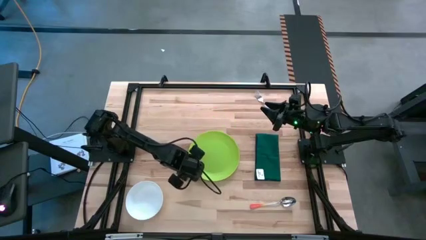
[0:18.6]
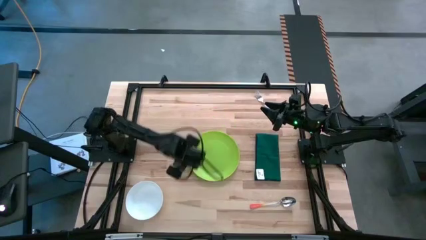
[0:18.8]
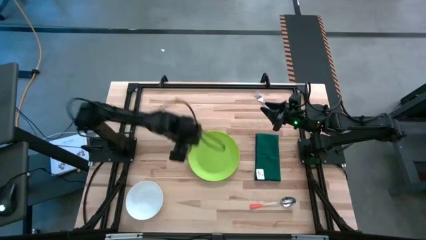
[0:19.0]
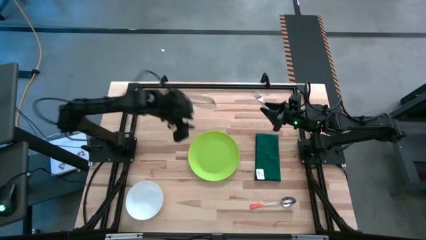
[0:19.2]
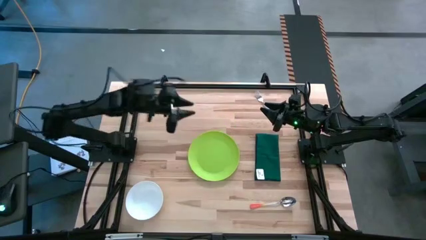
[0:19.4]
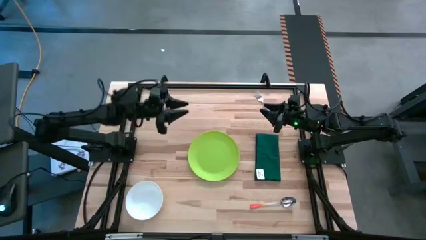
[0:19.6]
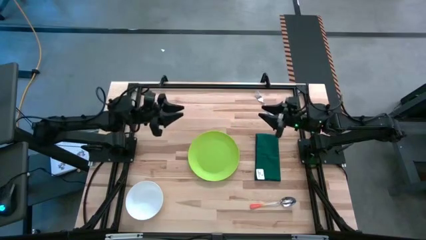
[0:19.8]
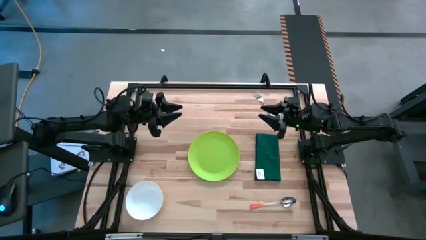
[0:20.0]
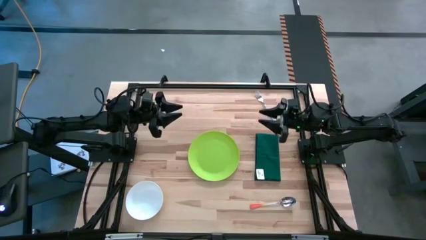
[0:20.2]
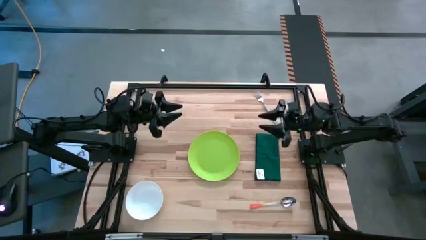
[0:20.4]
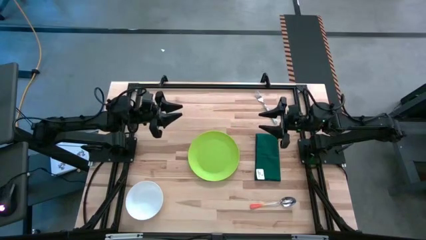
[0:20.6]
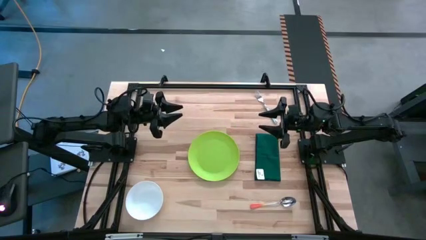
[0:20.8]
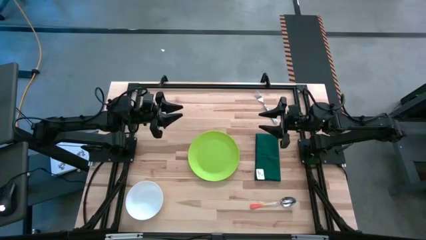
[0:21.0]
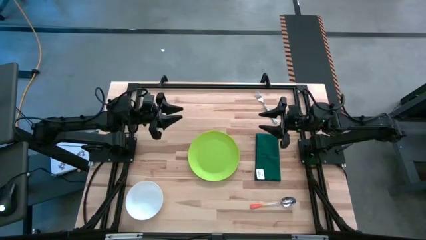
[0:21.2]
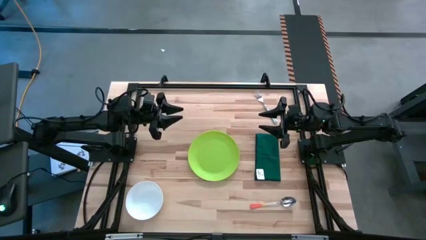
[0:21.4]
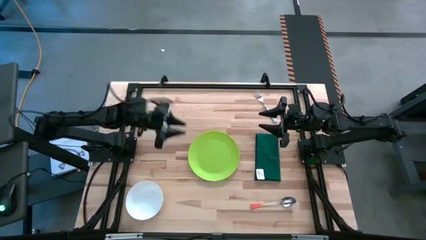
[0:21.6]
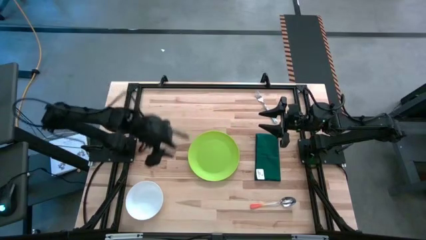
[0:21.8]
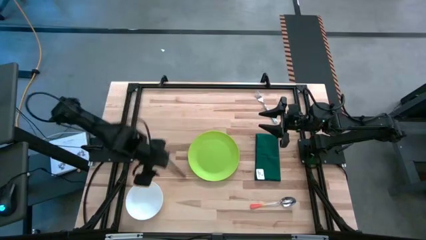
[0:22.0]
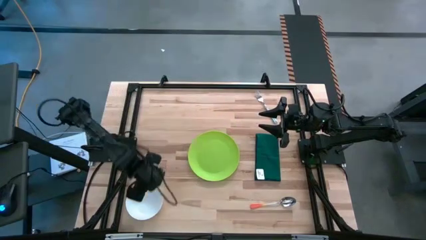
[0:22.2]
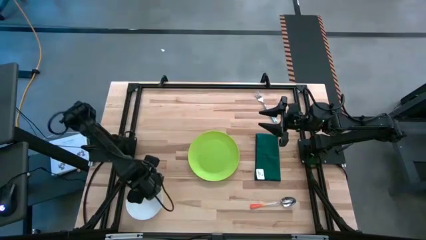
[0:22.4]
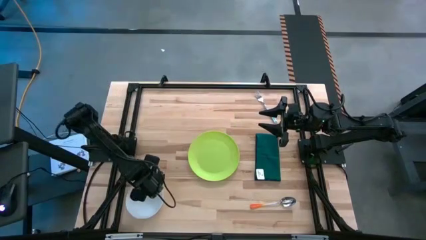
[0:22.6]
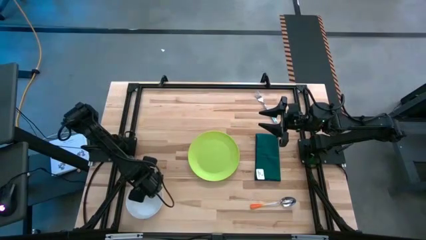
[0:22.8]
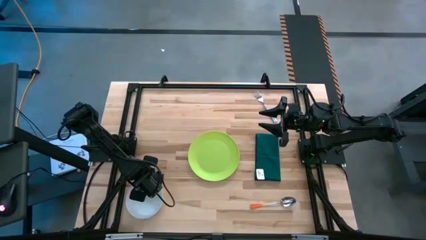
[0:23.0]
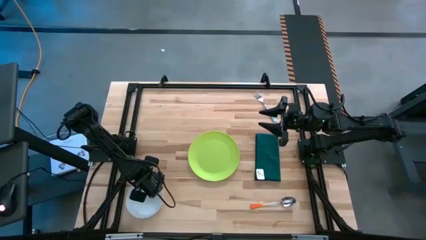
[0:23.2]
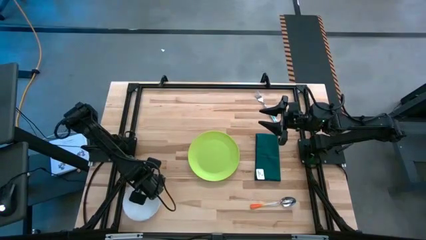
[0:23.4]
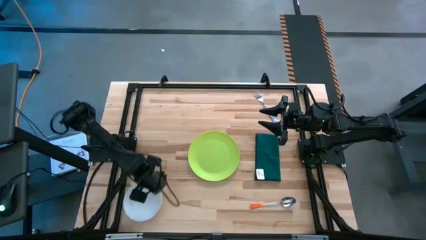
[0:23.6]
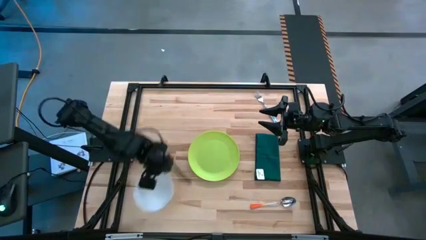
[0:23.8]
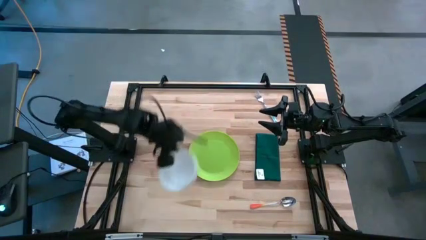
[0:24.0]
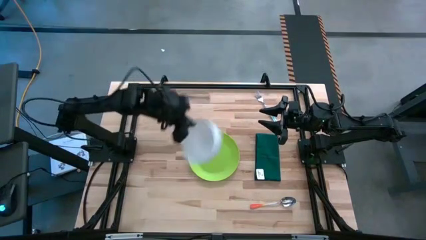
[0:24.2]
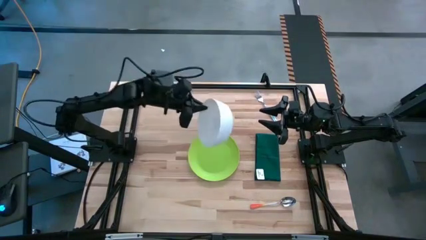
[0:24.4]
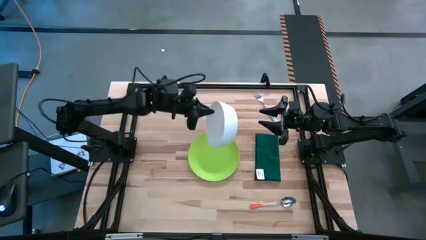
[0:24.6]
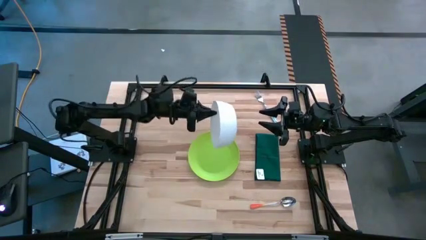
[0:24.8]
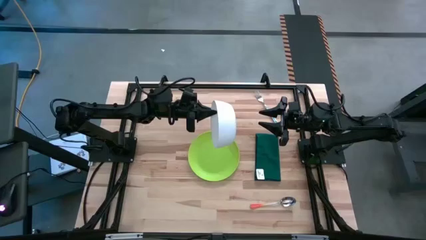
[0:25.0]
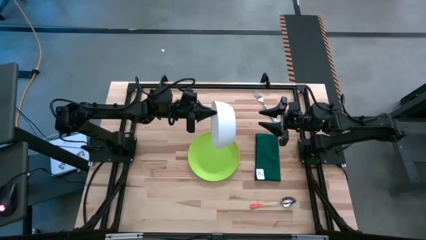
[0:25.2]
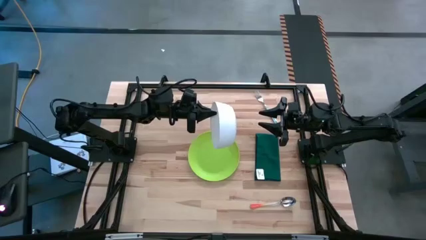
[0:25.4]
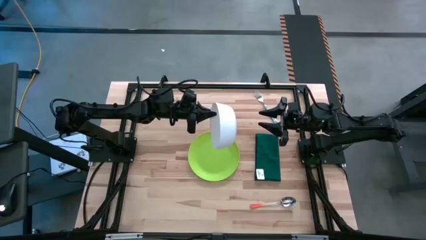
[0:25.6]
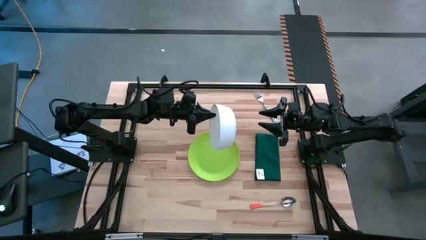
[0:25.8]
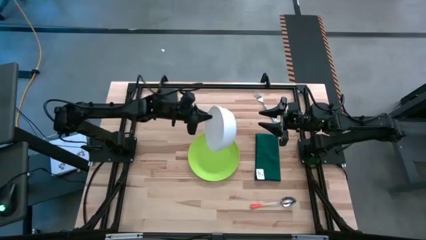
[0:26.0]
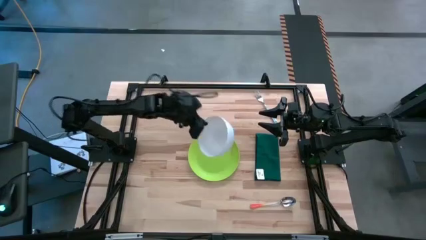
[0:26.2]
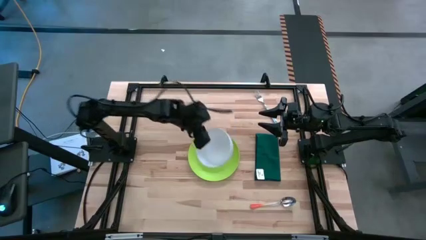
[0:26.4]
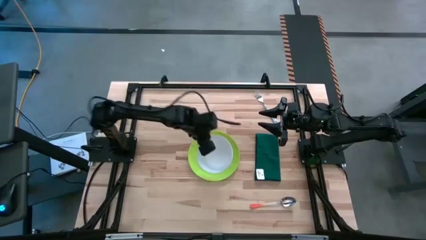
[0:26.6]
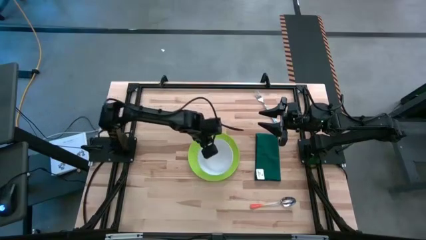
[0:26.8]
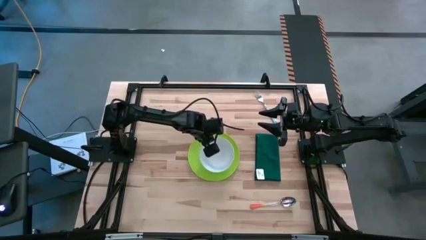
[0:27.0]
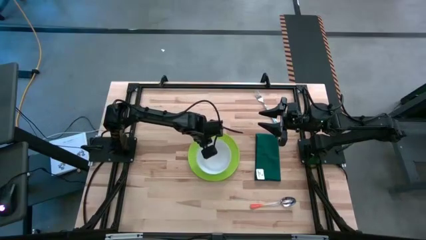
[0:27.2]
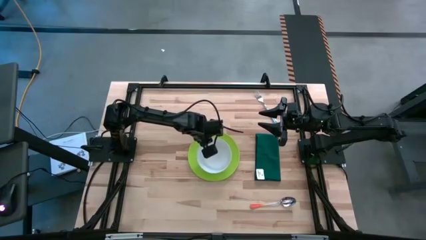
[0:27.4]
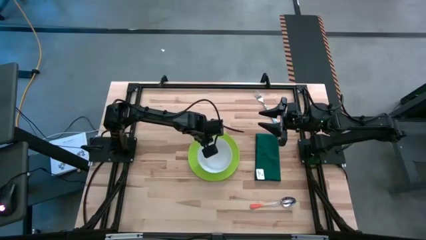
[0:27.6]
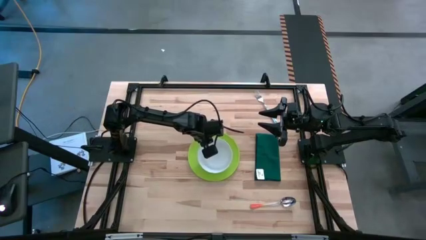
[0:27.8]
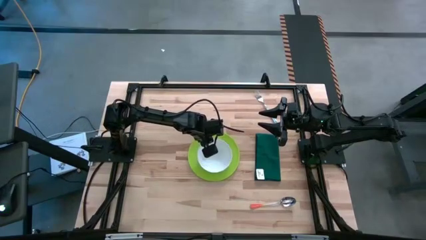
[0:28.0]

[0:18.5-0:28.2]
Task: Set table place
Put the white bowl on top of the green plate

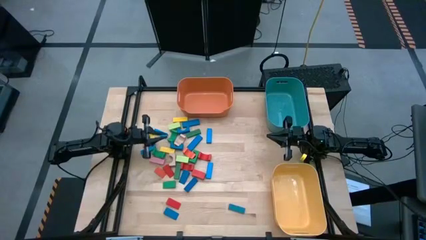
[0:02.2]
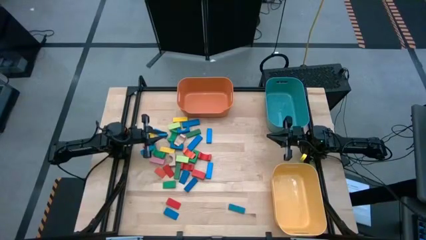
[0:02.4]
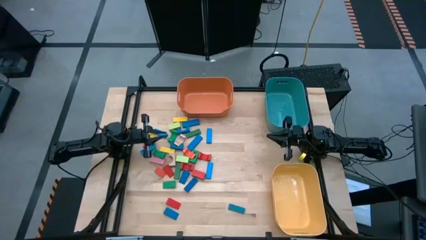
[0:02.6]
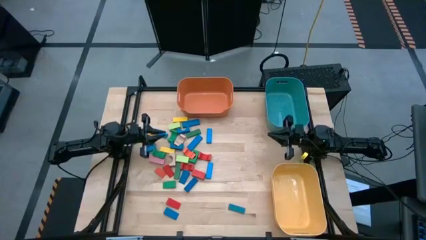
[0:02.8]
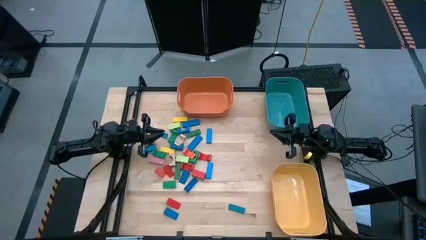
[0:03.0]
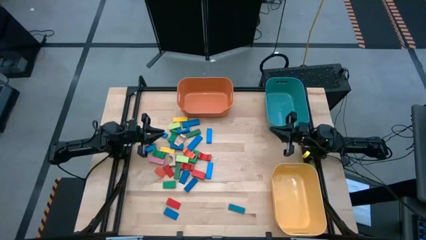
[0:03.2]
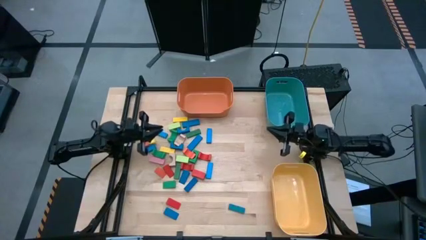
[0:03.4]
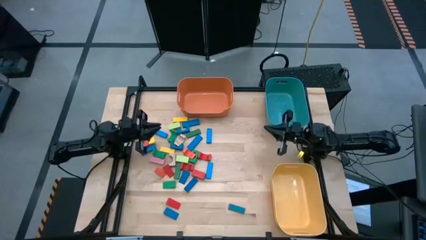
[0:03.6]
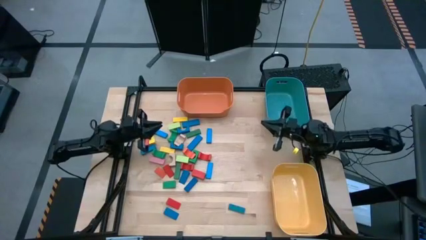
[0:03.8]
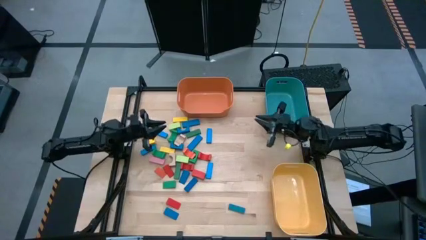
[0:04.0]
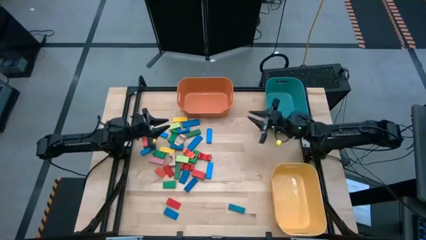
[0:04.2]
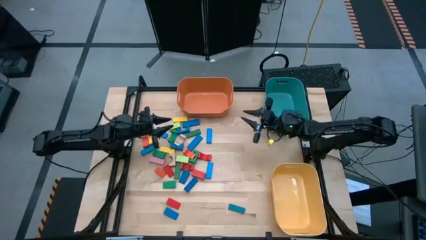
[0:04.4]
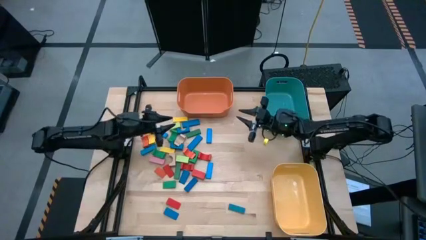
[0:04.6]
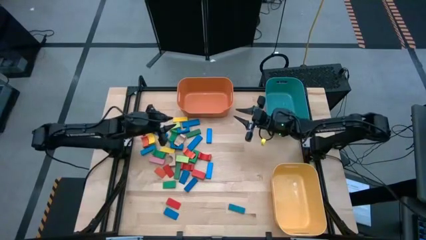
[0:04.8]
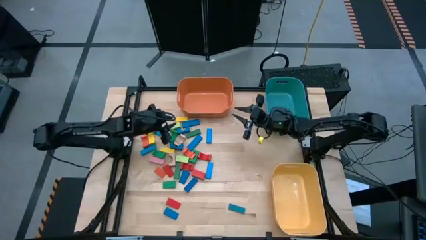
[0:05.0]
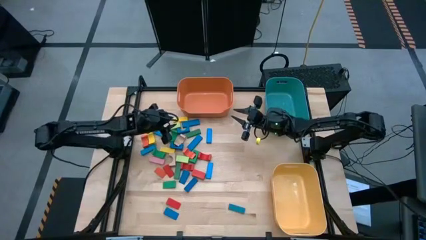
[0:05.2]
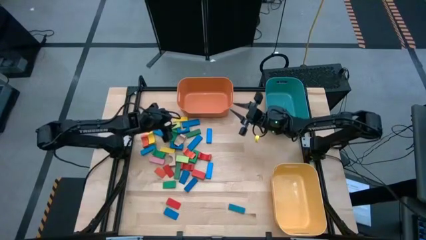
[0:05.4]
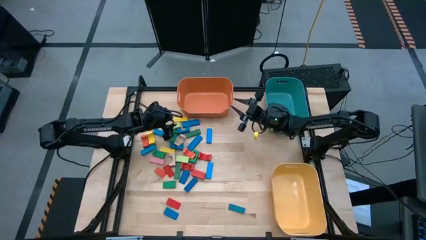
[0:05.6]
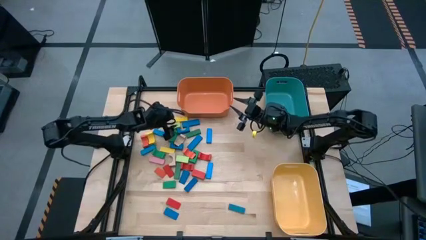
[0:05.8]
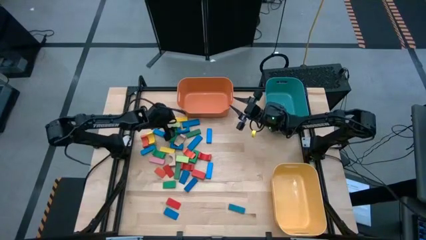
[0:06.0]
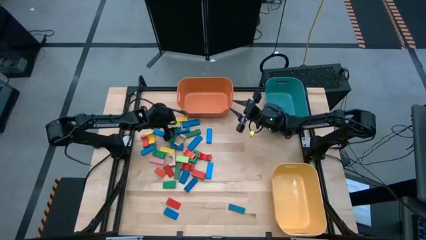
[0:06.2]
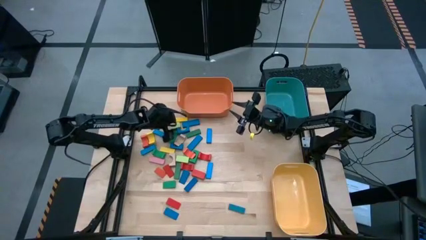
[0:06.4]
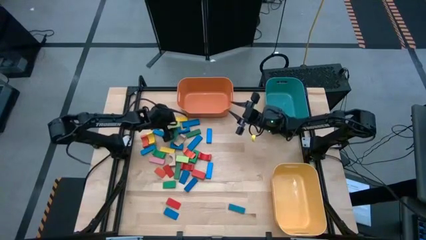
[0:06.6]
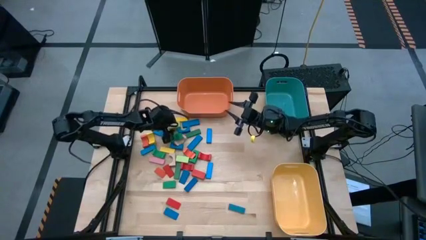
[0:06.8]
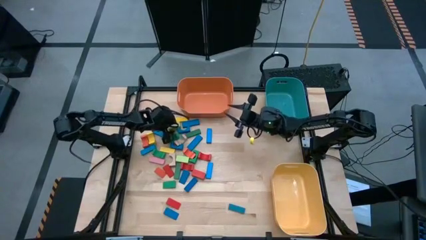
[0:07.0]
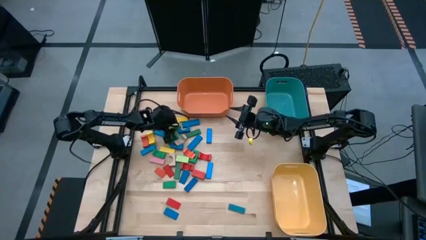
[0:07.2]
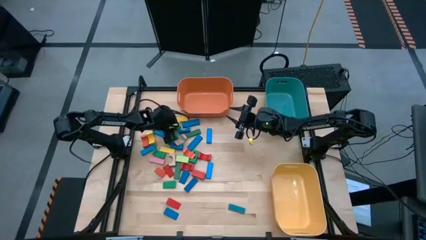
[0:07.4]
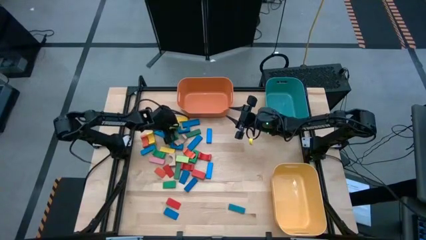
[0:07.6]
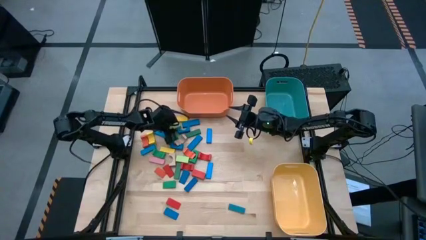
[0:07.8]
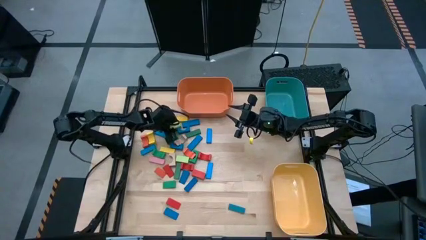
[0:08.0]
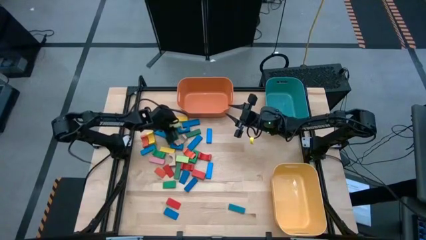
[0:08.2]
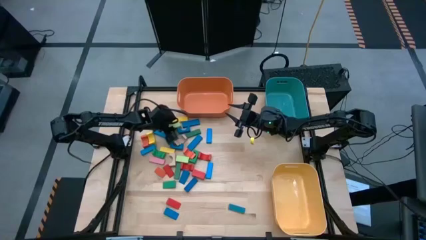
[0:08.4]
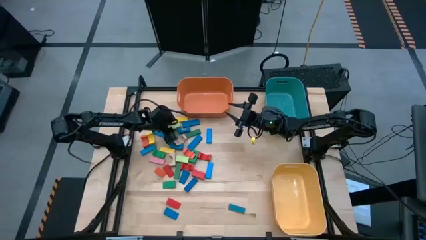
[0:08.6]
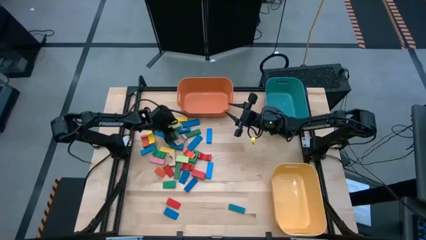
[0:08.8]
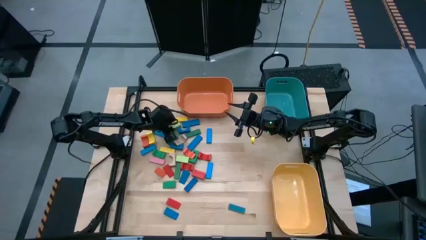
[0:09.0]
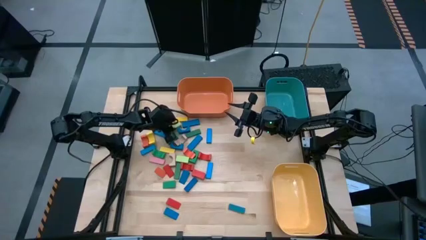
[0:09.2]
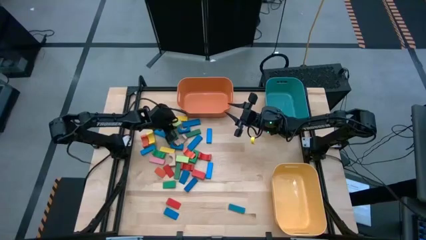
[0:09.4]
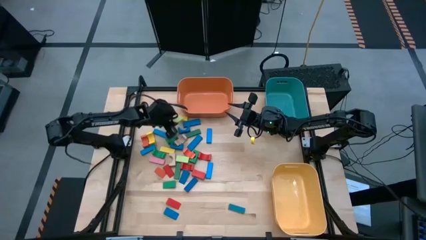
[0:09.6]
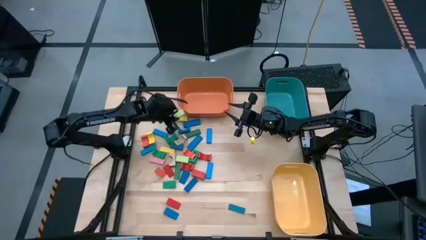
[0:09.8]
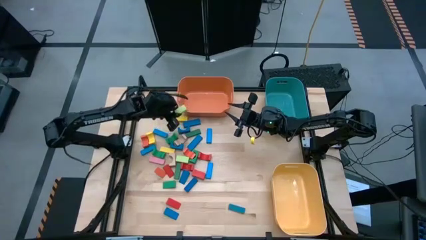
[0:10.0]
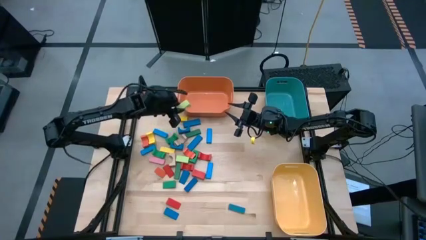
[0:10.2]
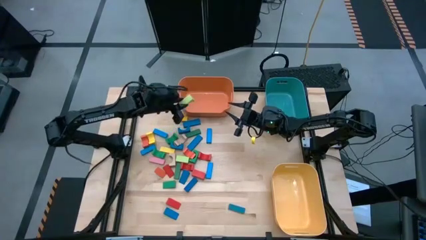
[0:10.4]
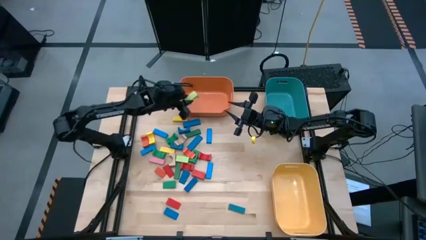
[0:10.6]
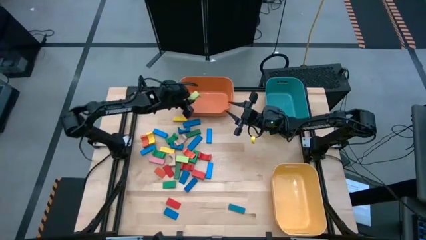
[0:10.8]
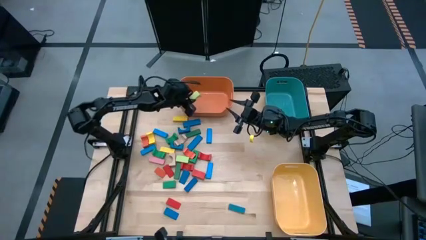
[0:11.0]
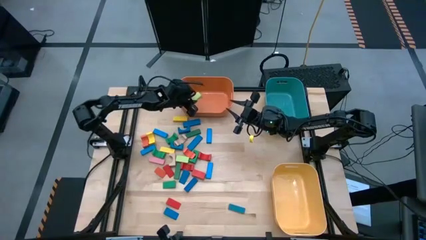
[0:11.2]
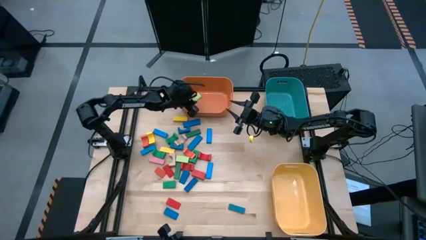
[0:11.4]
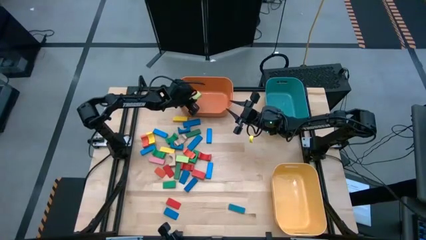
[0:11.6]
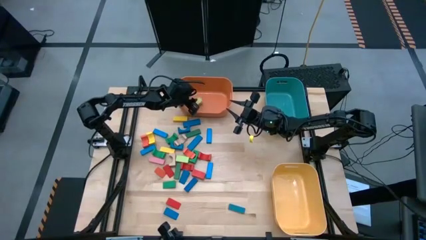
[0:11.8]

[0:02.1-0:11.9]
Task: Sort blocks by size
Put the light green arch block into the orange bin
